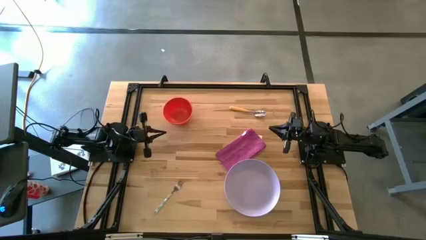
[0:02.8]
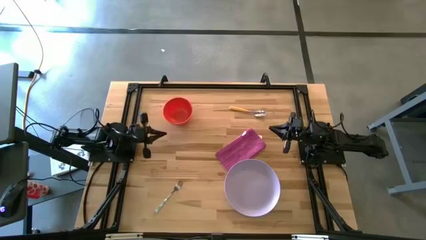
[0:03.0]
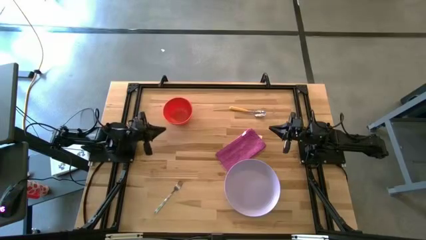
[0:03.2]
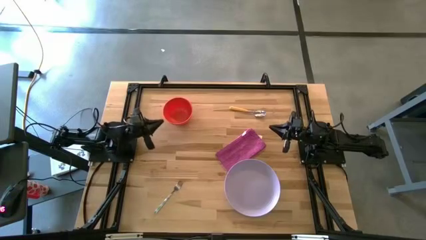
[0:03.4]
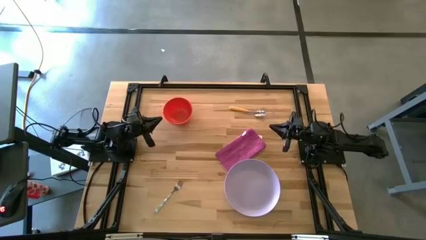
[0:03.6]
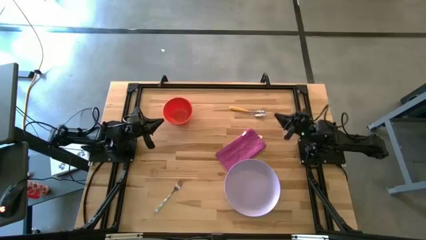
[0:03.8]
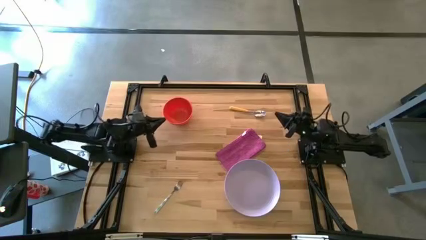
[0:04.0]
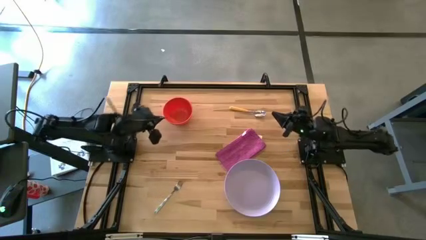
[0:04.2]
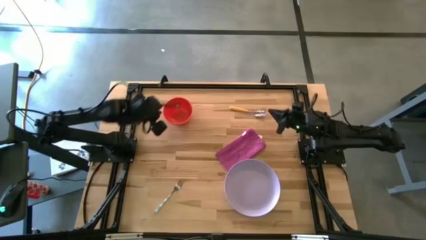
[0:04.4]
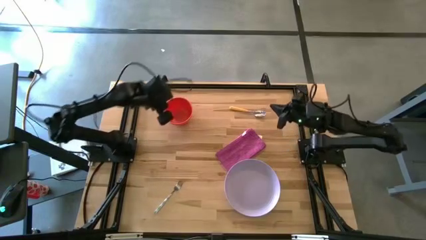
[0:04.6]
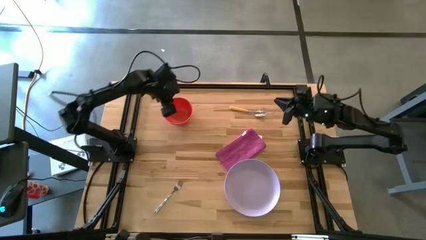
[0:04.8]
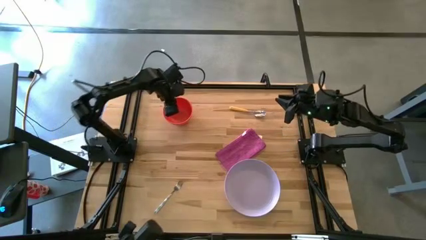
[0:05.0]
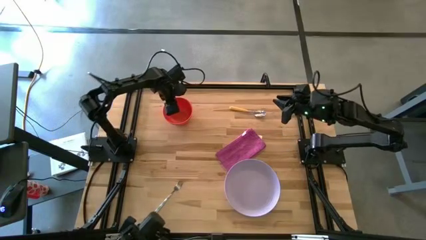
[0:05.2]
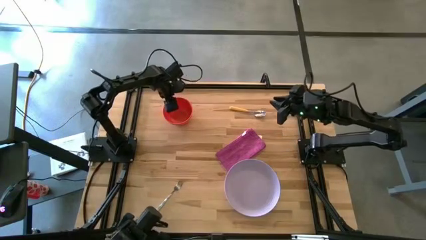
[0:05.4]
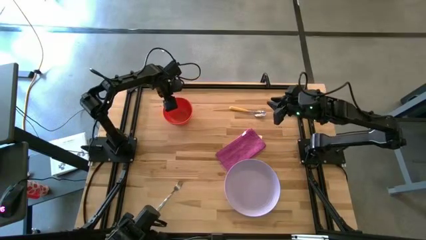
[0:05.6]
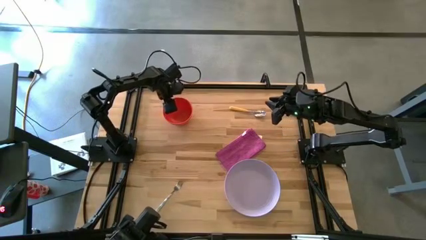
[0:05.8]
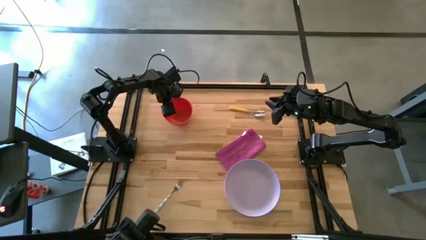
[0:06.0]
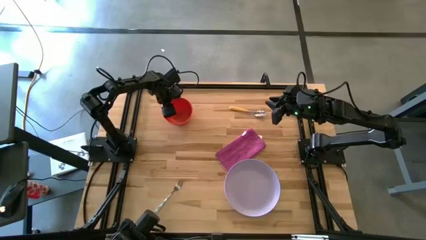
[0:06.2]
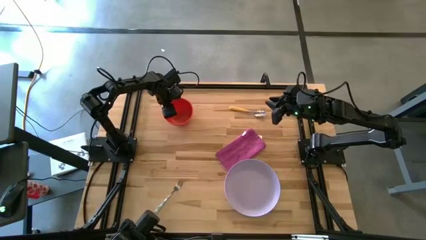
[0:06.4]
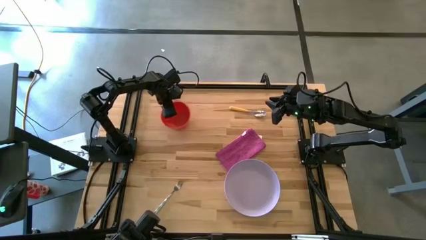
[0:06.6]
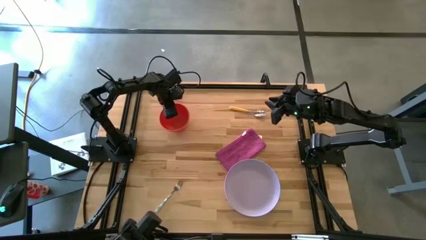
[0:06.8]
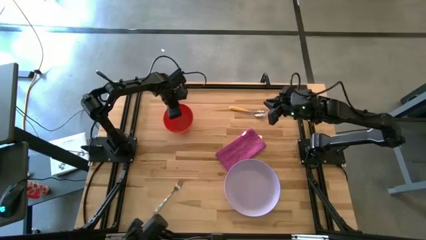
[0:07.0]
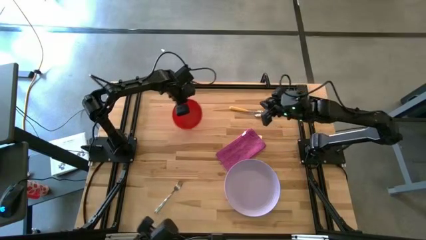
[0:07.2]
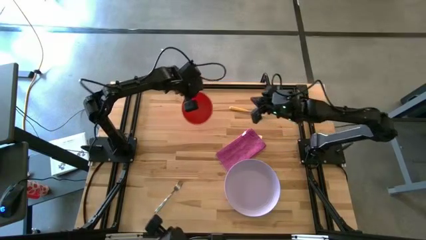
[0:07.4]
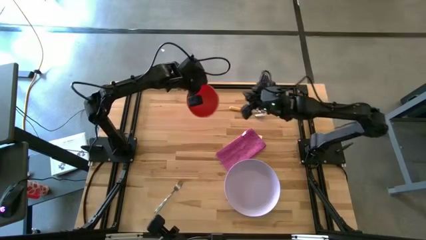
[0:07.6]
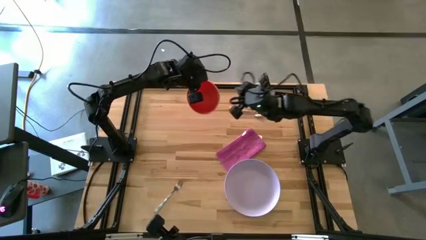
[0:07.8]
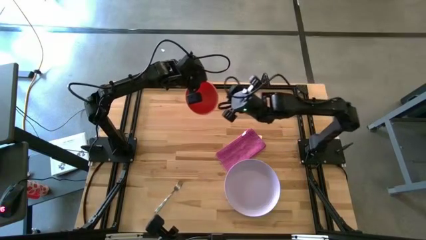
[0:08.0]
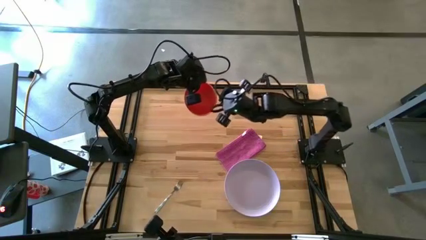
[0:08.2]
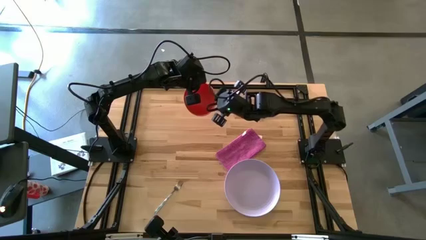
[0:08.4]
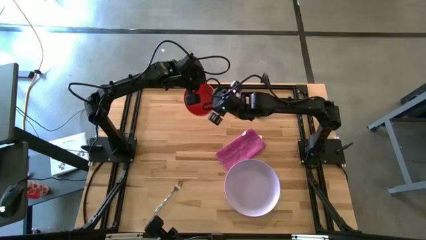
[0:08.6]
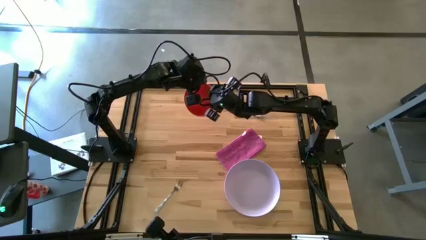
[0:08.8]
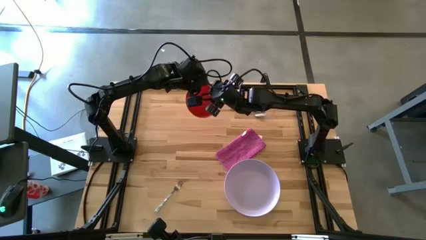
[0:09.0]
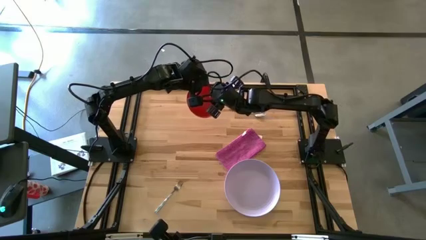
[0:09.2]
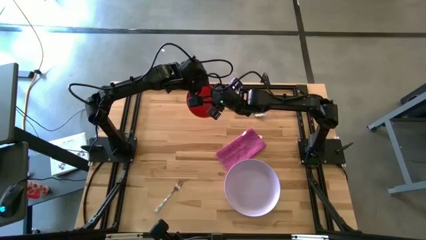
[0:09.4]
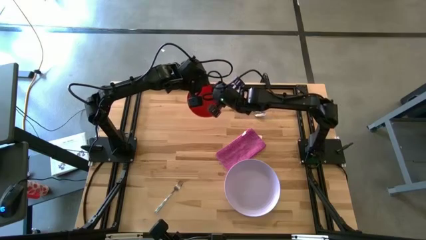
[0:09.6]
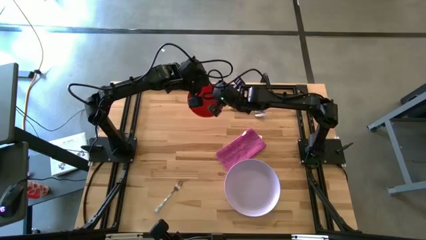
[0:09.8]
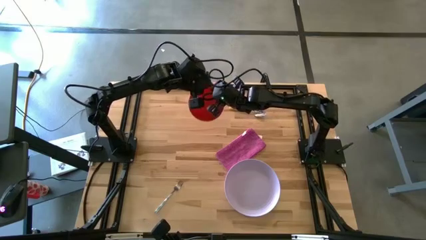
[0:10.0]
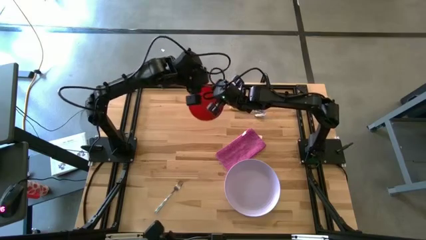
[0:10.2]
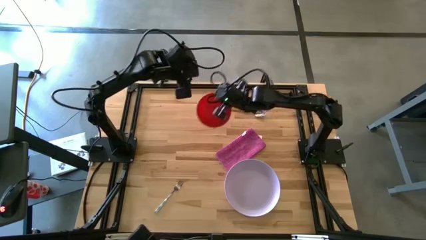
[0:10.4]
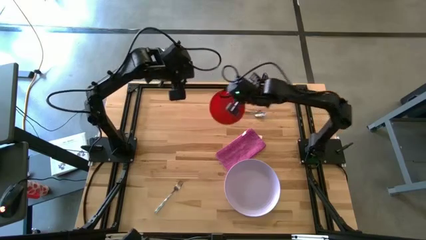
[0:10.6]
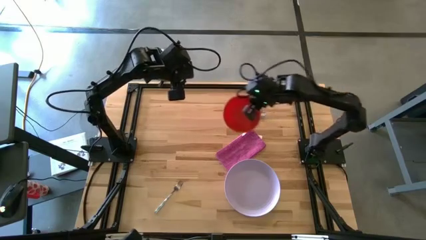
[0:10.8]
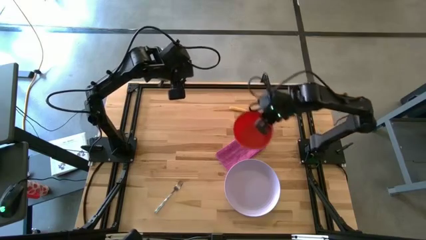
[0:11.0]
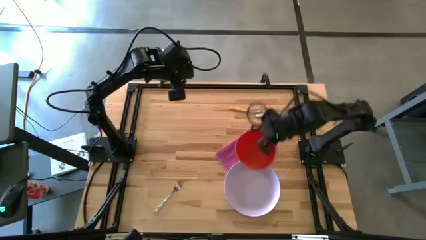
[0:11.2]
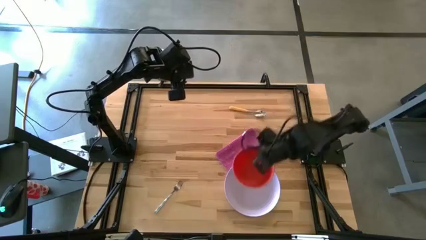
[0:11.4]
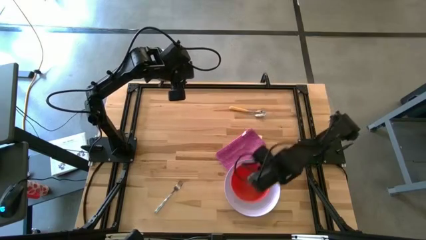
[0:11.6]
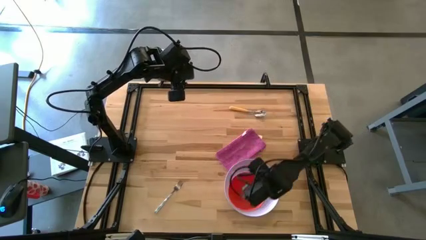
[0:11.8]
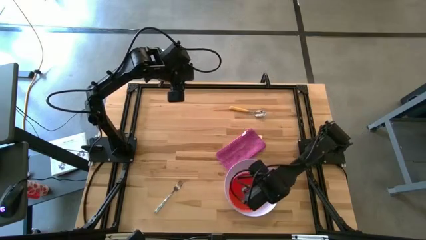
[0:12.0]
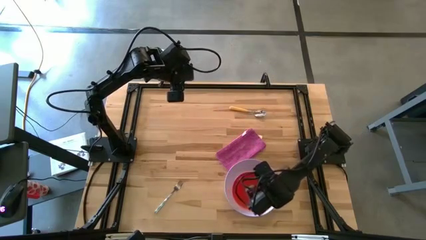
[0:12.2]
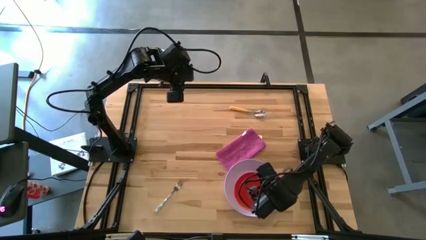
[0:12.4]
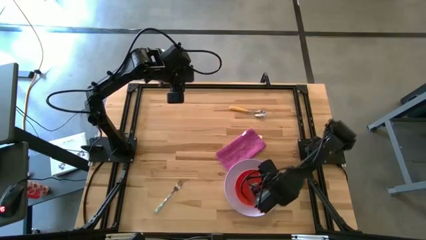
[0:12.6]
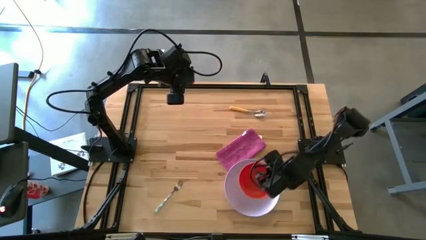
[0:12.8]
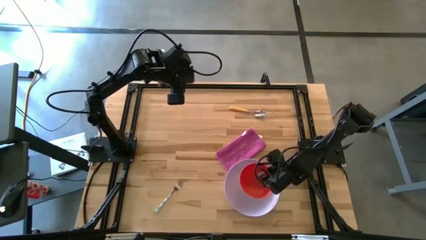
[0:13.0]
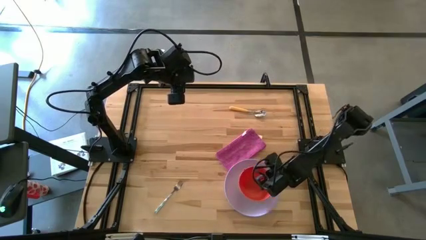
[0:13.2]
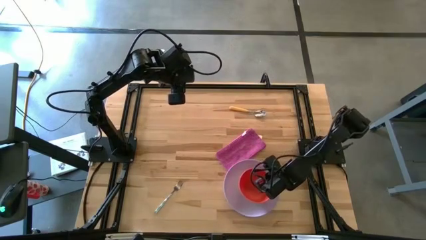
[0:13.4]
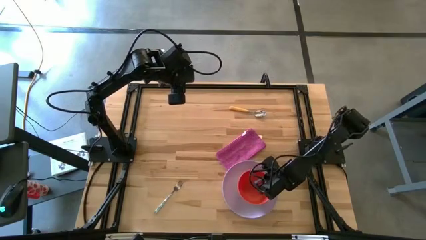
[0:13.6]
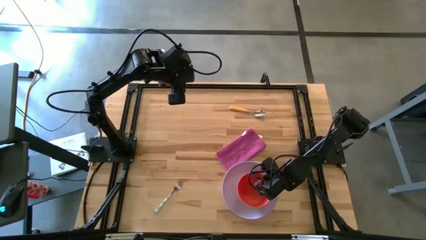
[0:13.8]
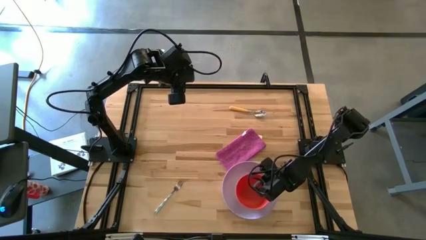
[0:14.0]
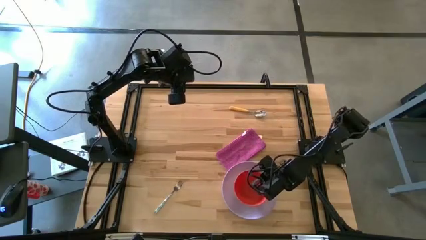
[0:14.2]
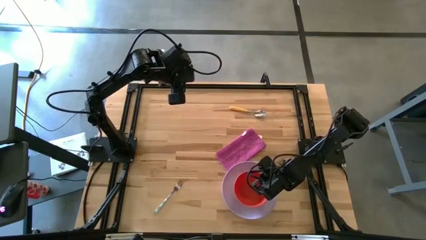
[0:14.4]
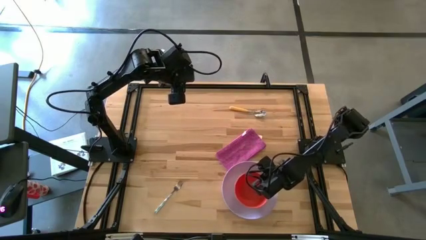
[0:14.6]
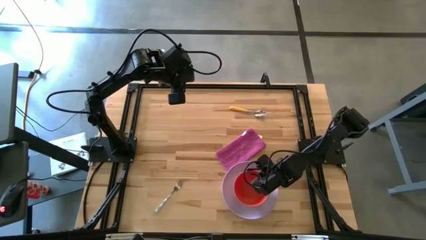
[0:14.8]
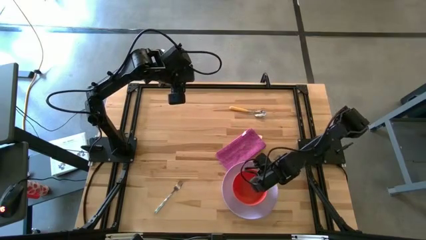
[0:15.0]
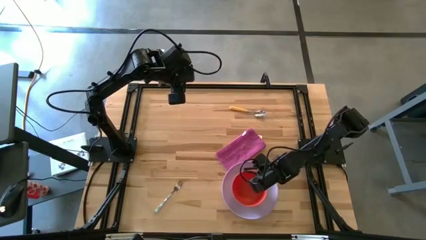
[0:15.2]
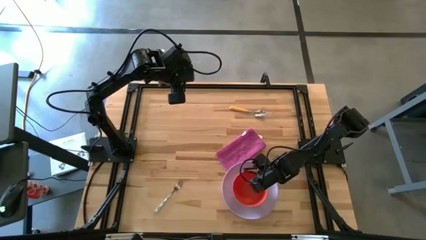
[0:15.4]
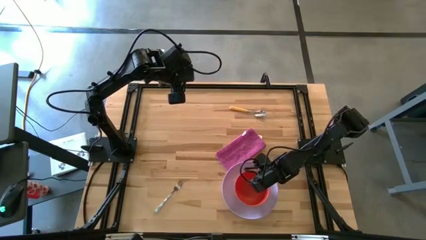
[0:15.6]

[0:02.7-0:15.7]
Task: Set table place
Put the orange bowl on the purple plate

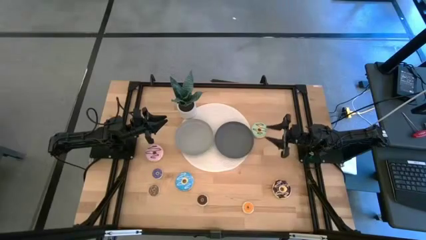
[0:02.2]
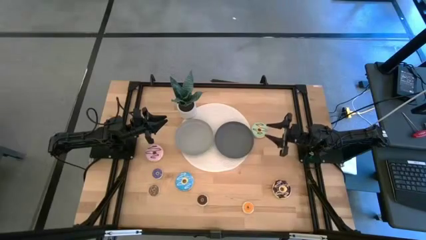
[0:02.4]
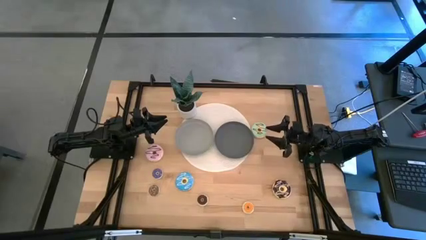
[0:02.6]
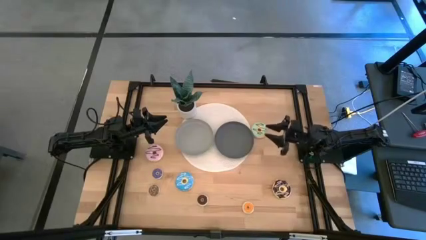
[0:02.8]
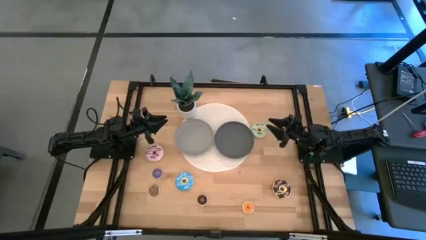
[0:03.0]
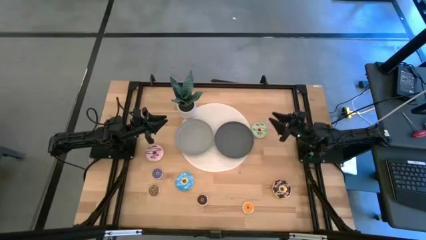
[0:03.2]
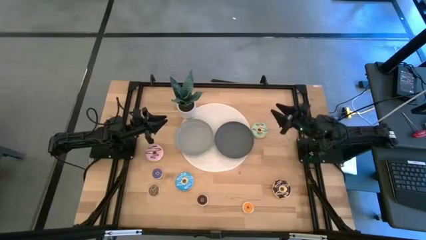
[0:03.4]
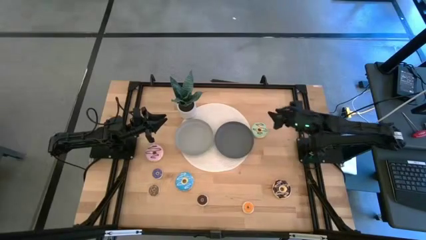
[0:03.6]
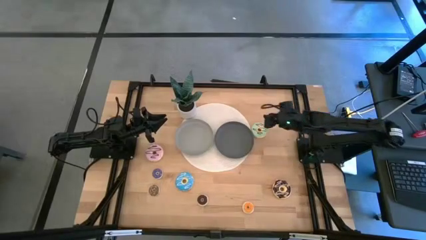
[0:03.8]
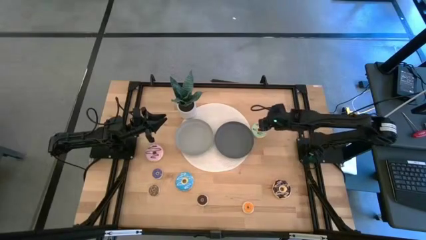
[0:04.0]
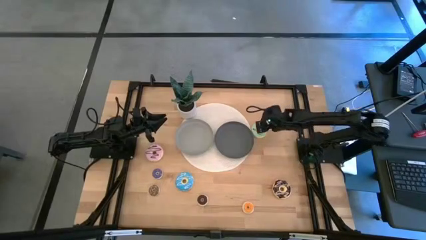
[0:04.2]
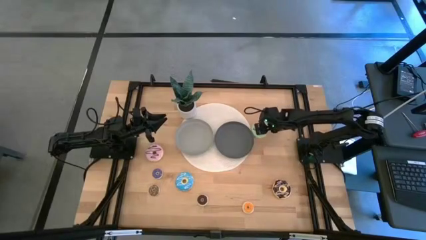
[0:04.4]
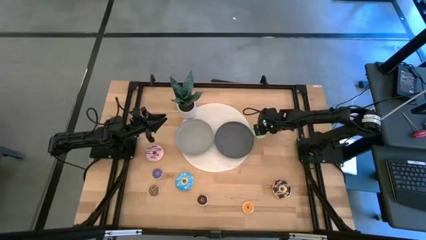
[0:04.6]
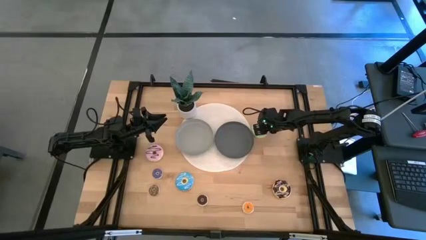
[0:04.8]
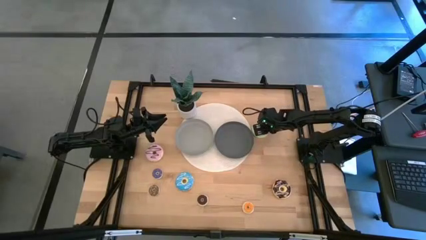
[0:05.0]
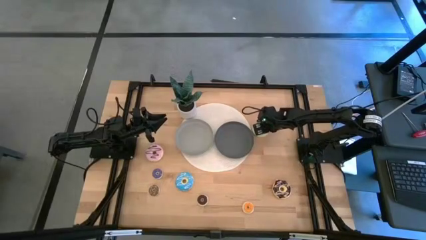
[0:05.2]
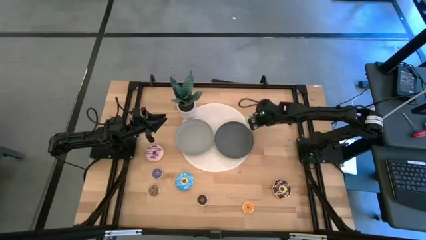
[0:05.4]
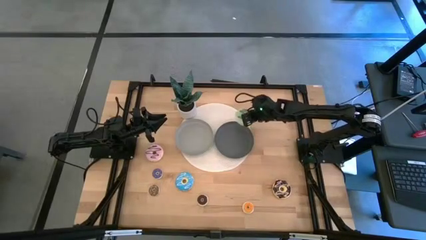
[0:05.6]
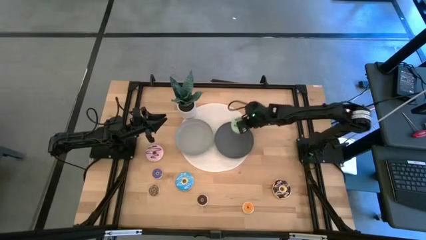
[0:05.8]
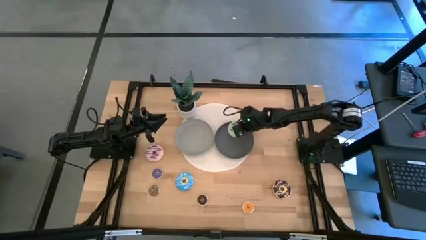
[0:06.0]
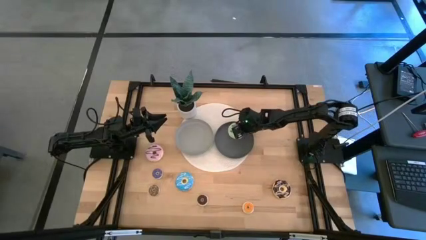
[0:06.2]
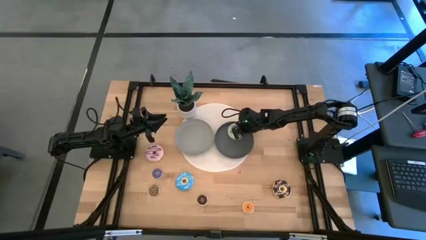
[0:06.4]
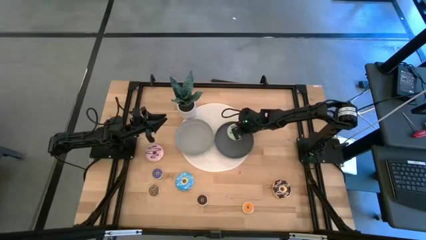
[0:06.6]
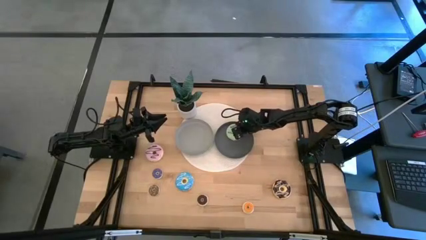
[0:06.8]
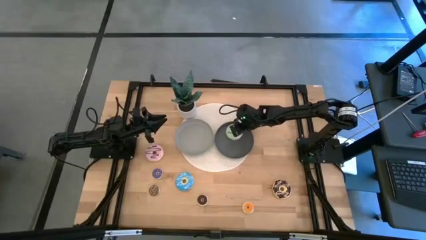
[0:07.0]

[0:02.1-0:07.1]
Task: Pick & Place donuts
Put the large green donut on the green plate
